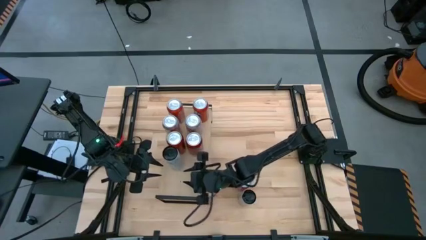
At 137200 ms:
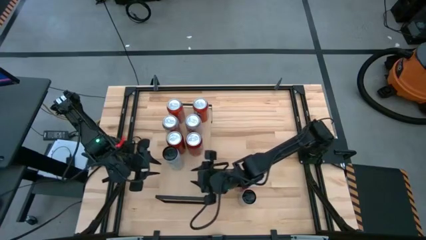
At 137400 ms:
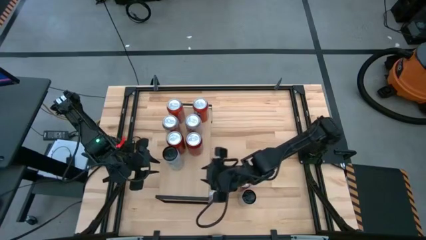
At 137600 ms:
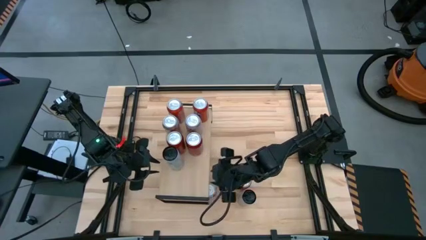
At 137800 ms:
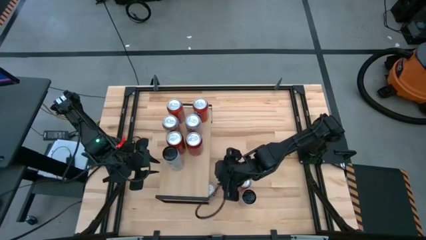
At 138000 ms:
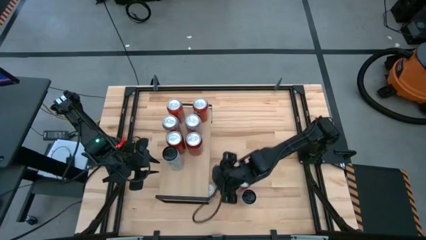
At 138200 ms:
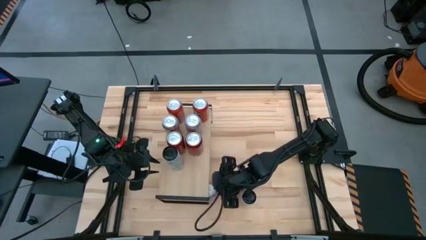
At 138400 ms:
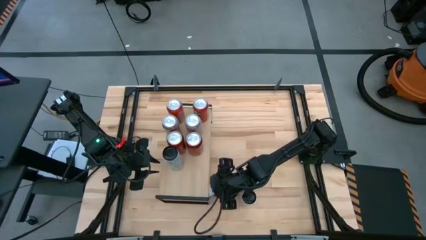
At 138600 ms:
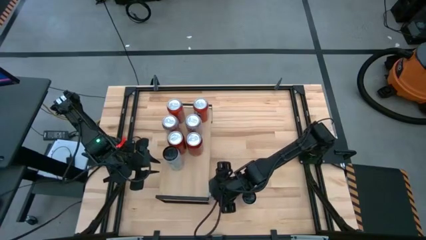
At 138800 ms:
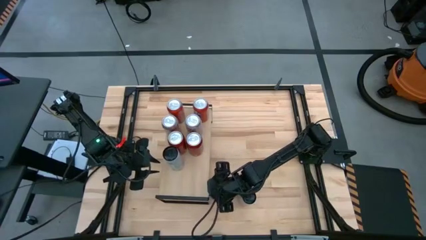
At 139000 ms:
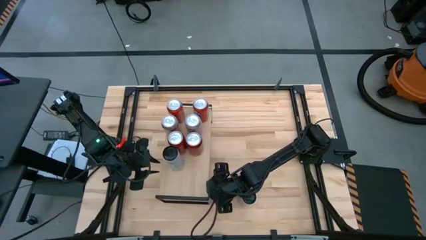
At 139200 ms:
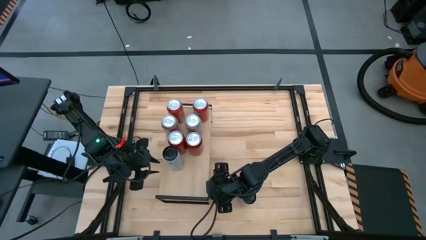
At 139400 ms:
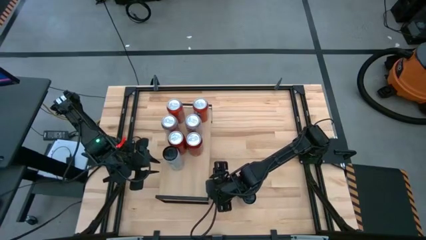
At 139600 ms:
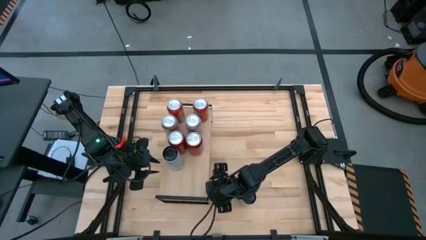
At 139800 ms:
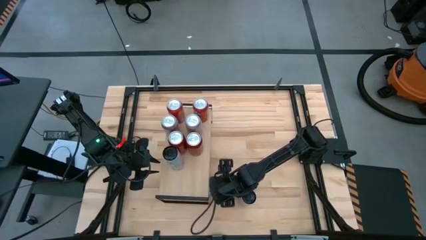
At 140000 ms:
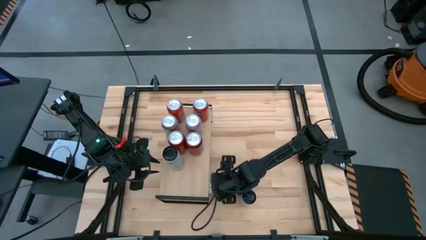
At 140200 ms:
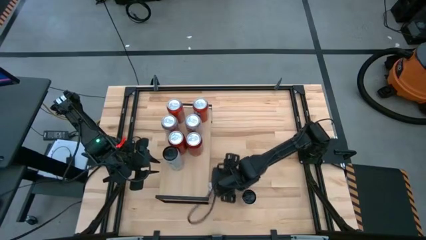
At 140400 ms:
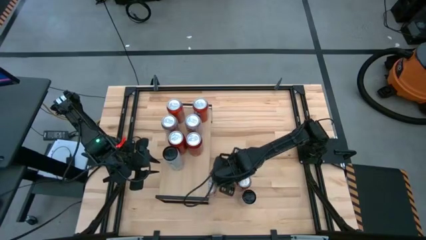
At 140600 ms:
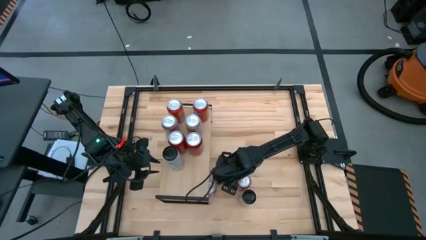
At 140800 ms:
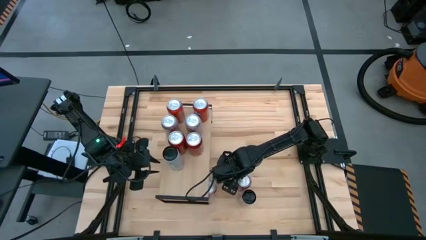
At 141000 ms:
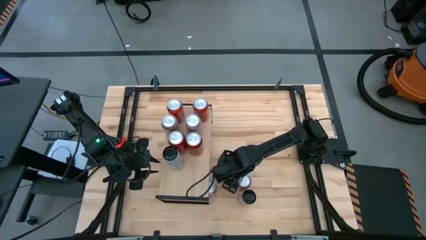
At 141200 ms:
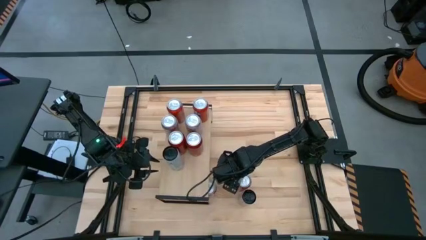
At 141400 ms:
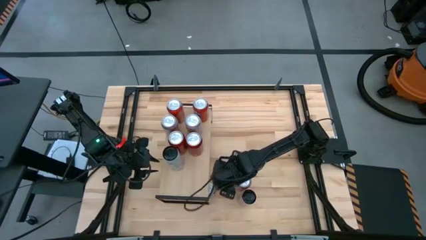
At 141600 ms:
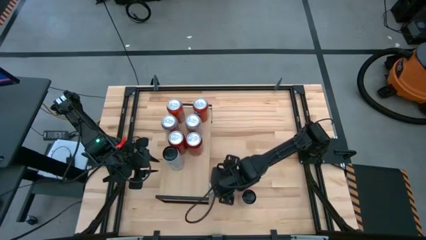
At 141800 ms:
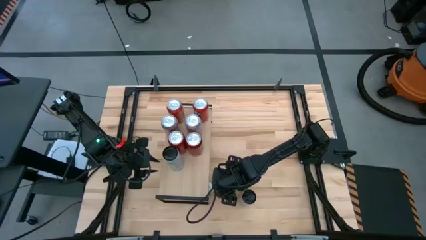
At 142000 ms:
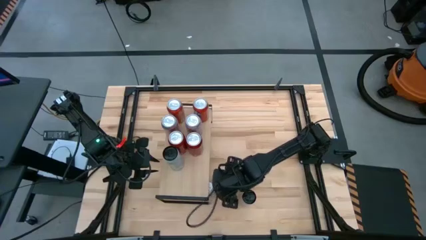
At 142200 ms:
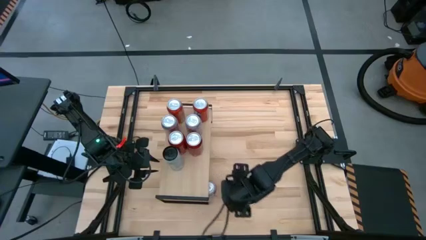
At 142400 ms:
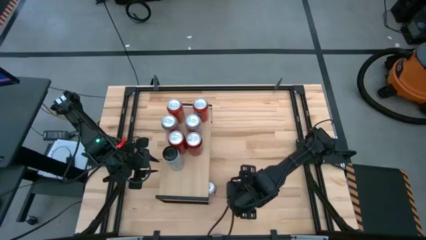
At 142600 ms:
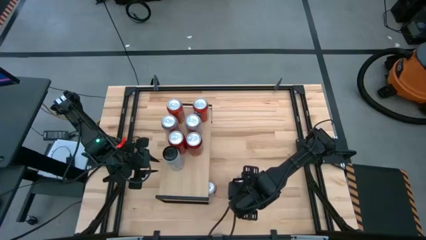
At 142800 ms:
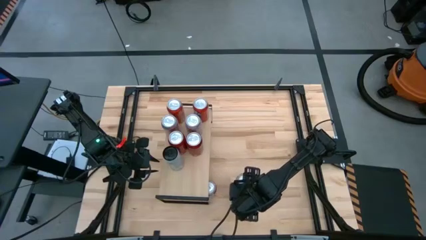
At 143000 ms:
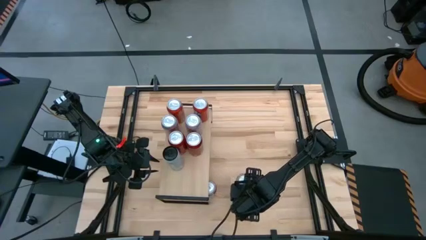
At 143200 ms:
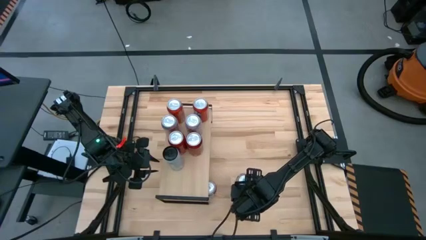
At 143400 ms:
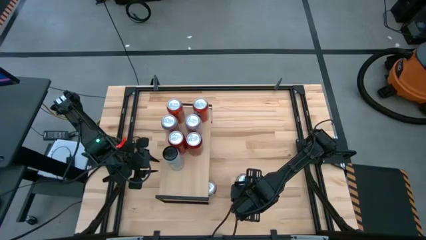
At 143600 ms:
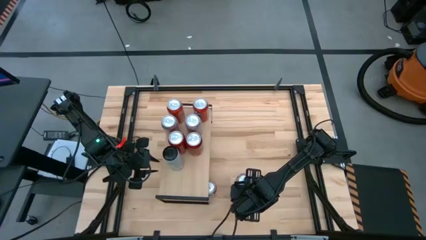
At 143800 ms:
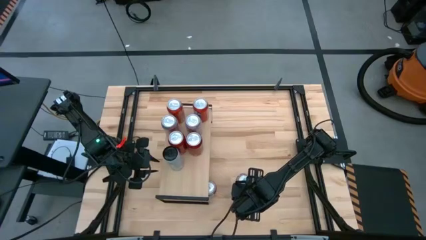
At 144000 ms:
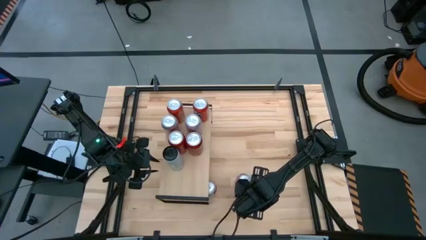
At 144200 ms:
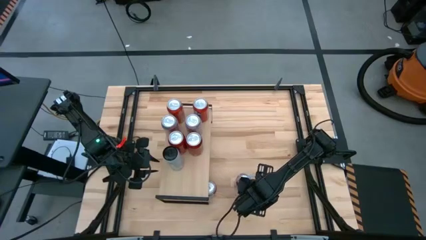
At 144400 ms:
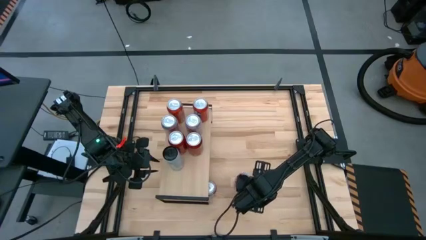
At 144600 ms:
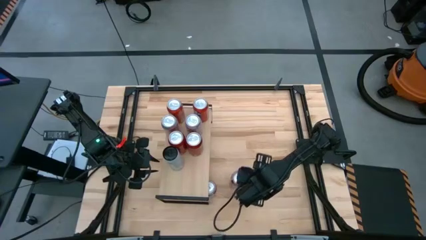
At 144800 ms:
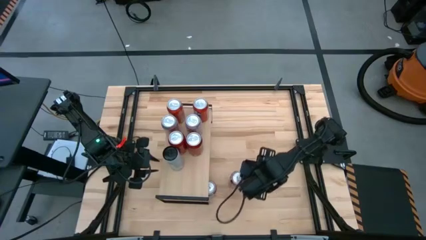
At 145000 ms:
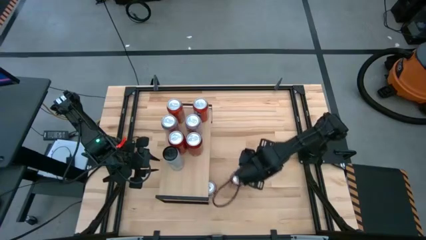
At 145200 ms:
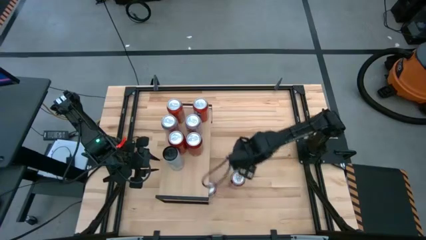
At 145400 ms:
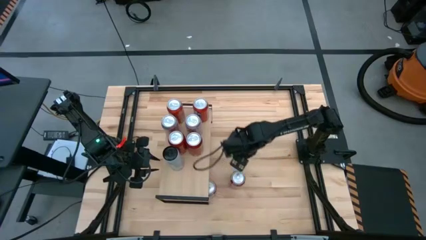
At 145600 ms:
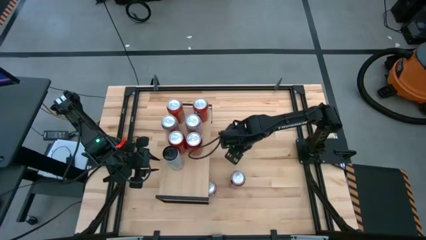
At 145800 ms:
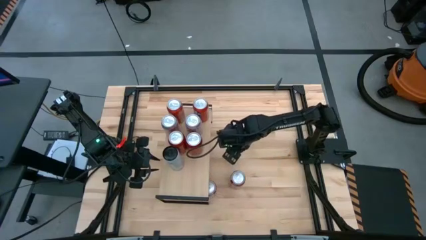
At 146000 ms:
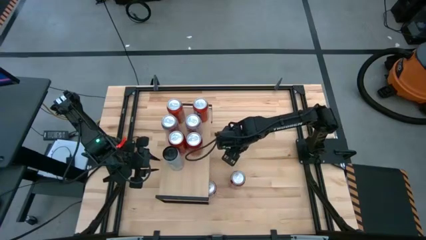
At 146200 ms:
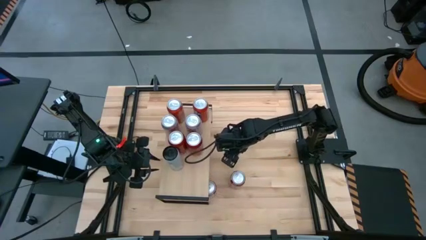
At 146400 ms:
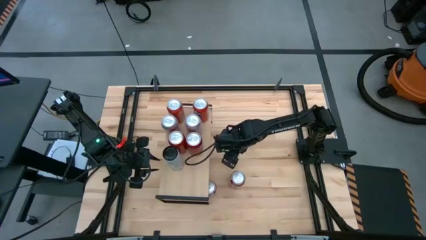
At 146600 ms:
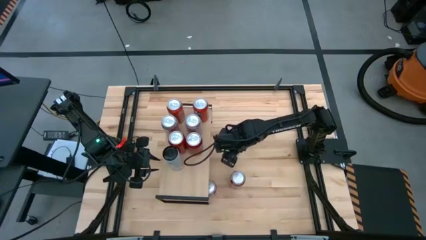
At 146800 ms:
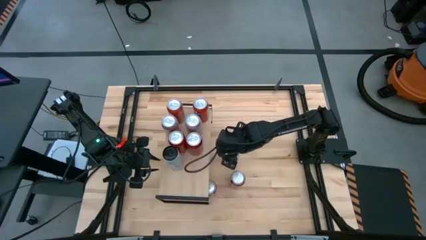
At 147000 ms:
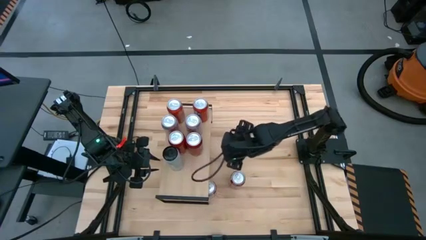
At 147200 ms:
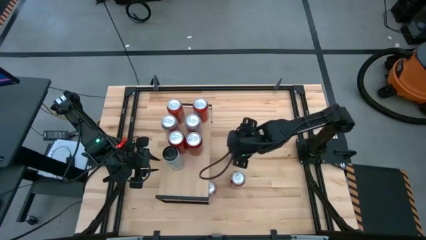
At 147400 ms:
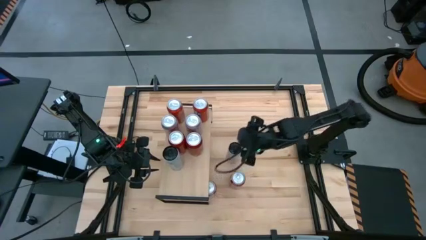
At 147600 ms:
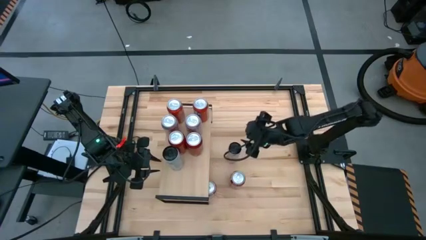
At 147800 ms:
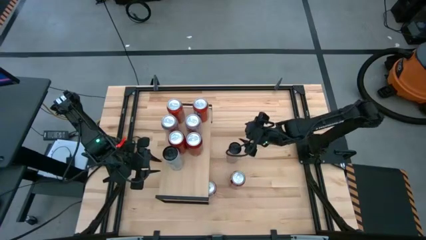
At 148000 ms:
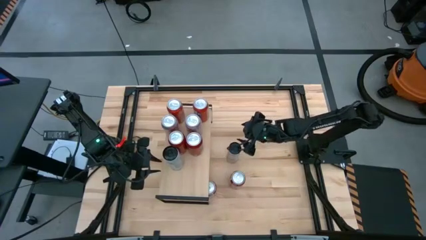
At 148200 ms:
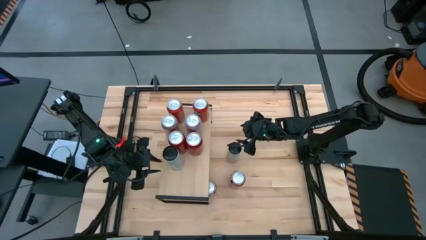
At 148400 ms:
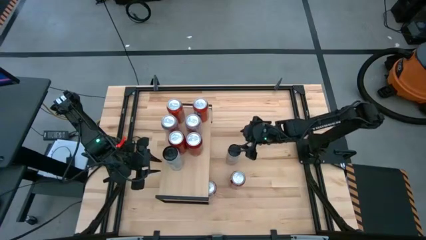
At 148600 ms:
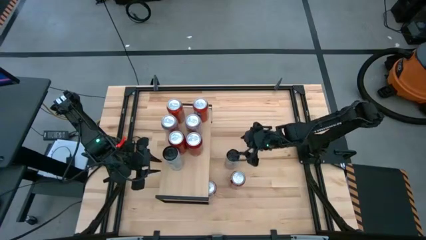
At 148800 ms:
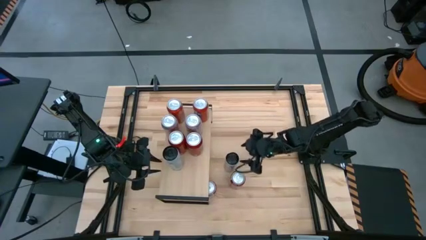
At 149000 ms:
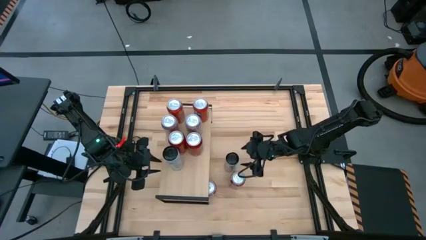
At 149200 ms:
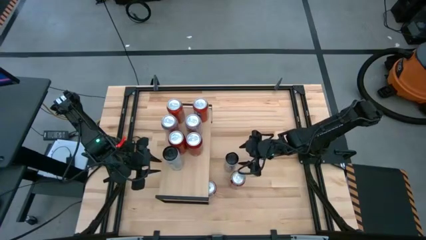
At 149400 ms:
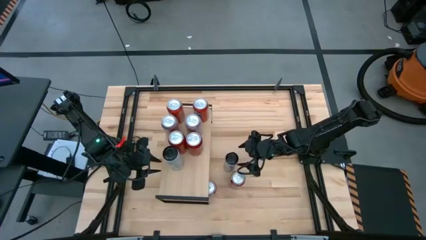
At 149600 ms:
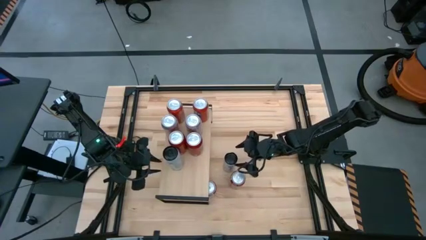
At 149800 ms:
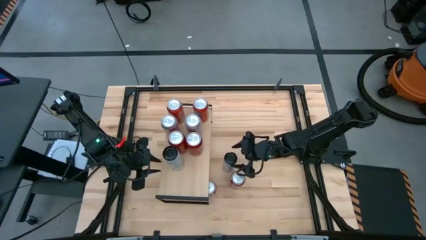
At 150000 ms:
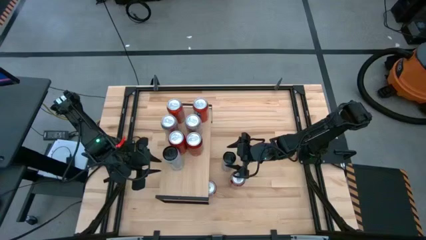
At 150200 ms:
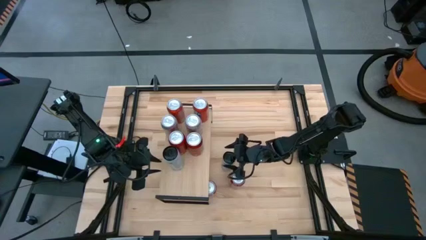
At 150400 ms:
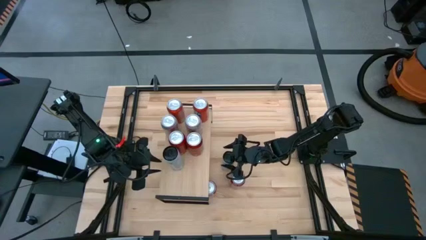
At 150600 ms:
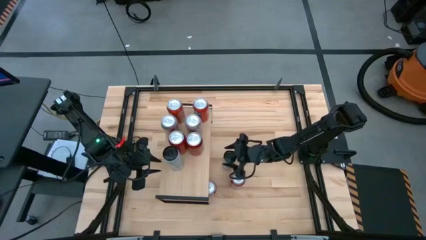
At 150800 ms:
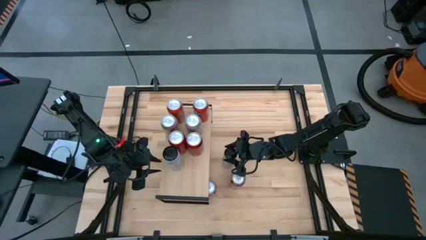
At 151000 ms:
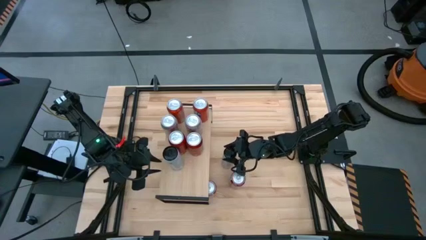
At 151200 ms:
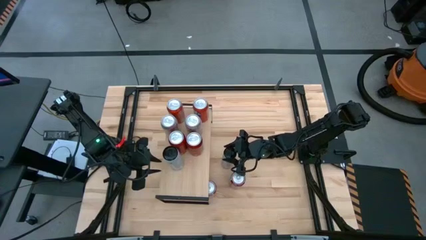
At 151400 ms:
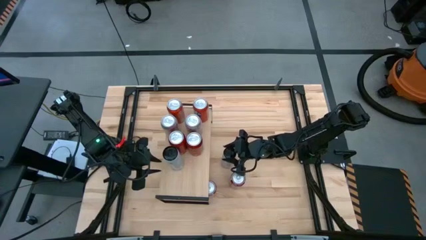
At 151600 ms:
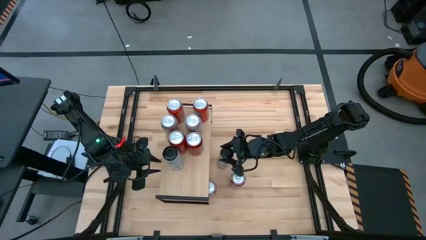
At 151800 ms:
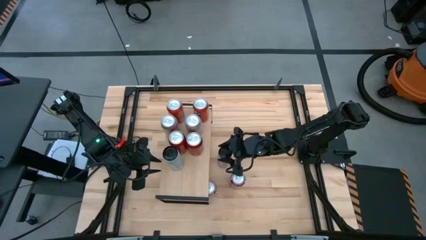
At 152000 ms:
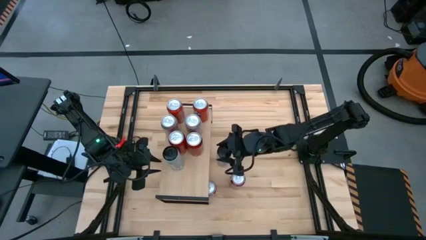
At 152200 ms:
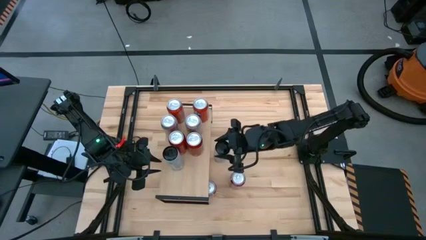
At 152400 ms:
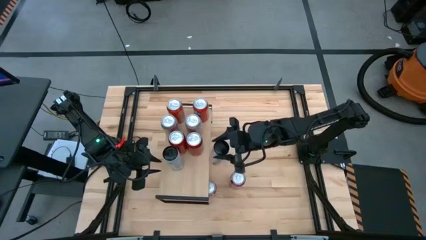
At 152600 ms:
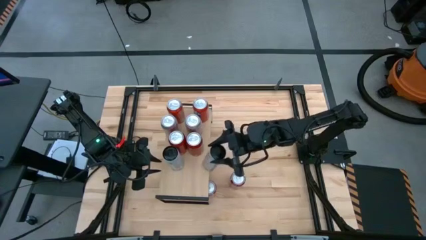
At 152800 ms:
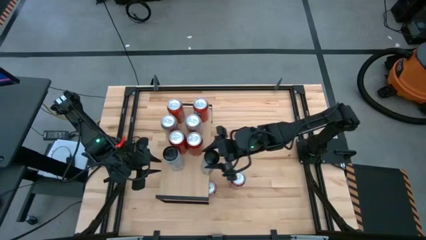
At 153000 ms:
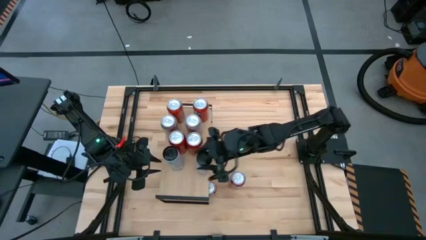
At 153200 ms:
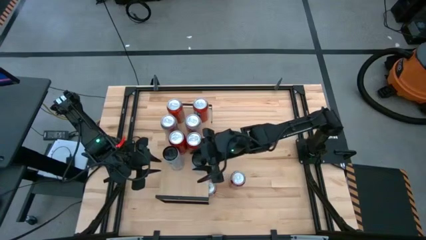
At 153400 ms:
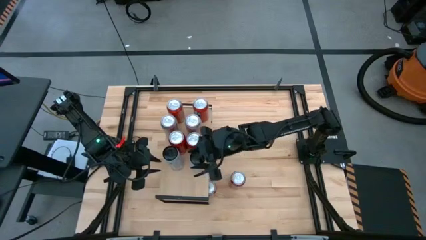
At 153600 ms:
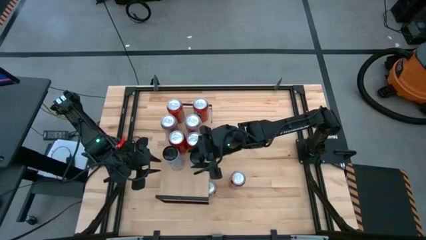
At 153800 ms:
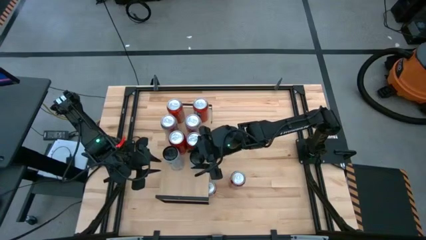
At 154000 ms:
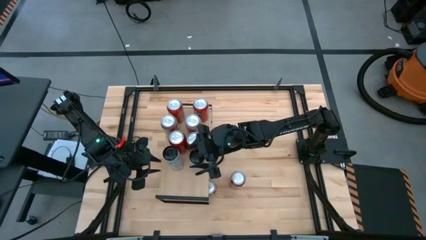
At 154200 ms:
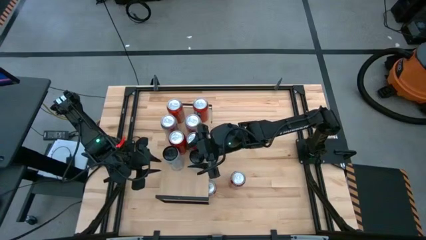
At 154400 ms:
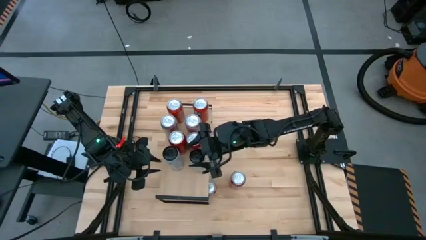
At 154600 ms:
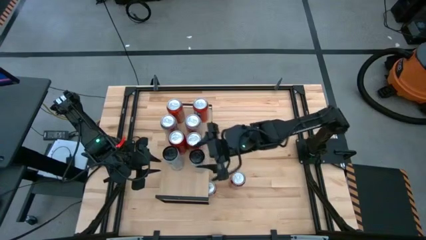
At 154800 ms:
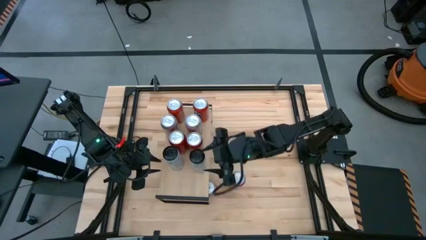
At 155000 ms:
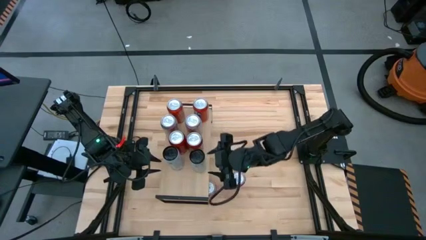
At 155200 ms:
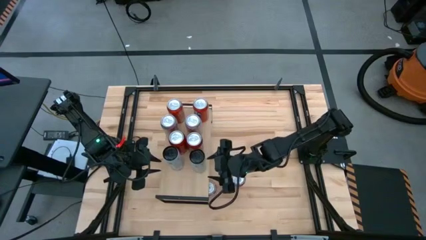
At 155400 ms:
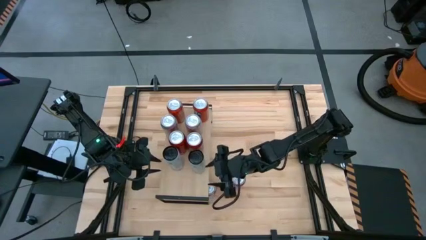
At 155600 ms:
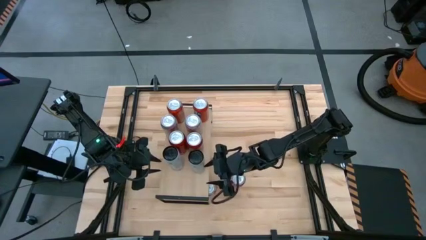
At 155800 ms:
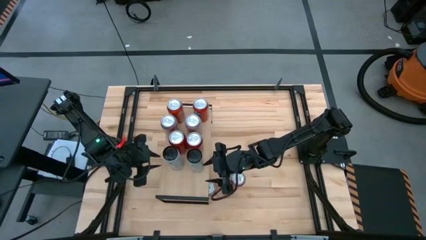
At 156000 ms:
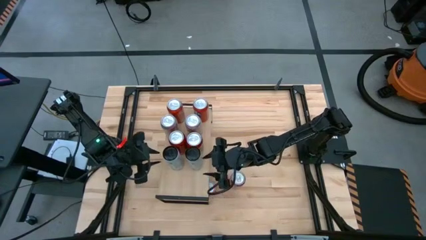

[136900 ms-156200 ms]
Task: Place canned beverage on shelf
Put the white yellow soda can on the shelf aligned with the other yellow soda can
